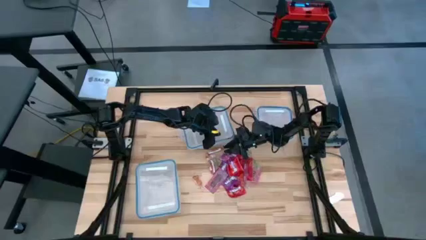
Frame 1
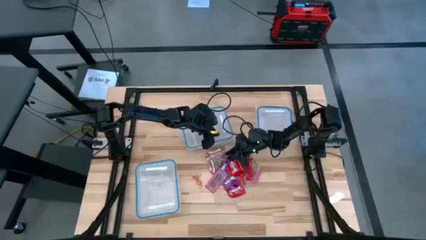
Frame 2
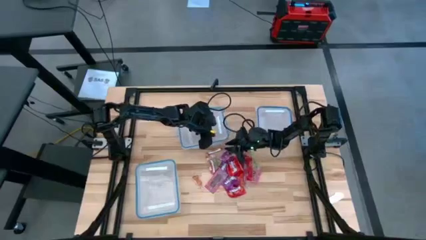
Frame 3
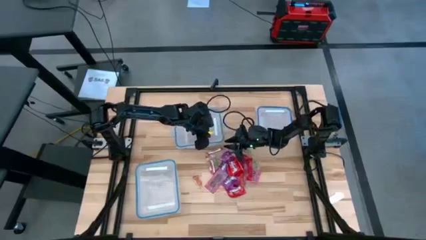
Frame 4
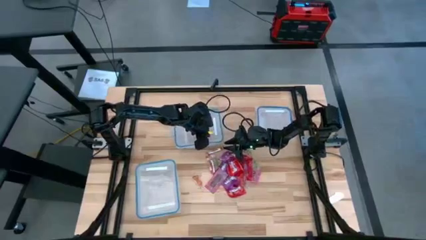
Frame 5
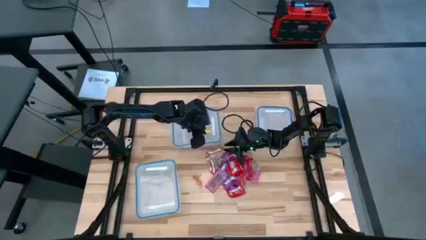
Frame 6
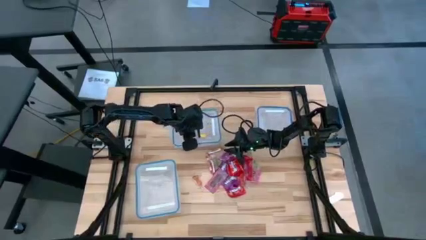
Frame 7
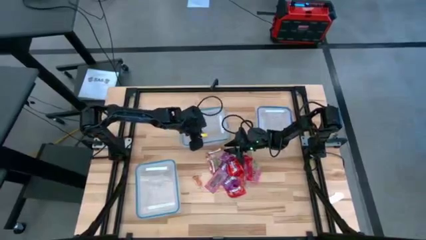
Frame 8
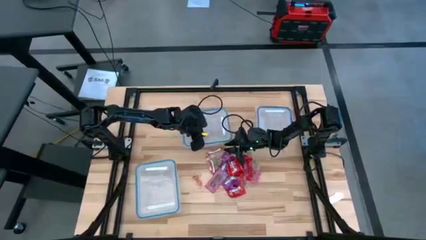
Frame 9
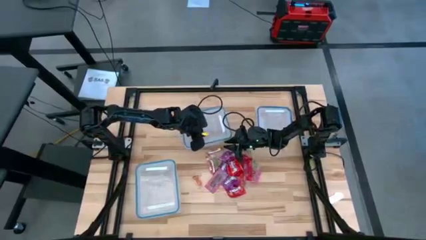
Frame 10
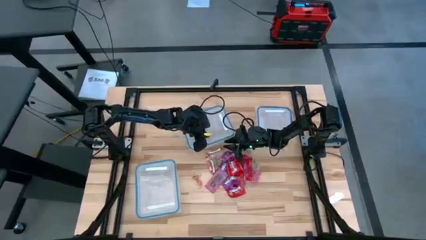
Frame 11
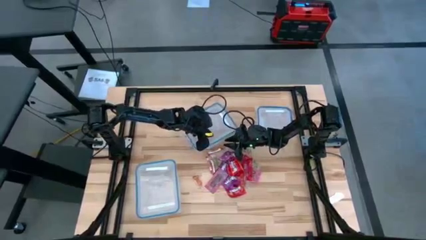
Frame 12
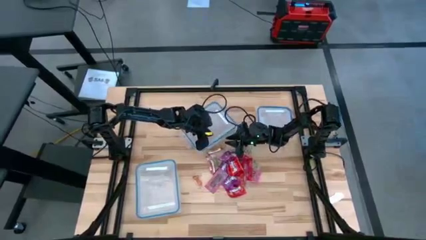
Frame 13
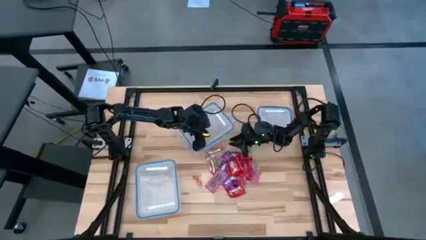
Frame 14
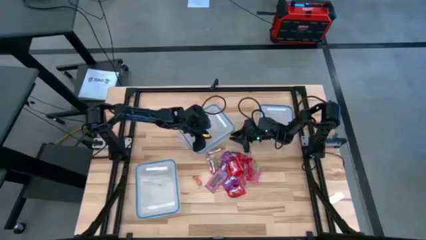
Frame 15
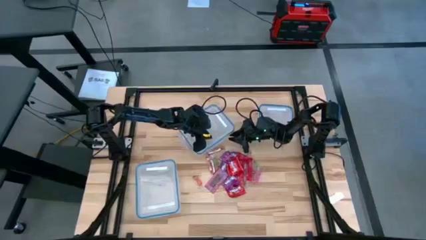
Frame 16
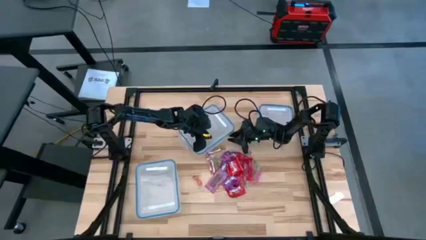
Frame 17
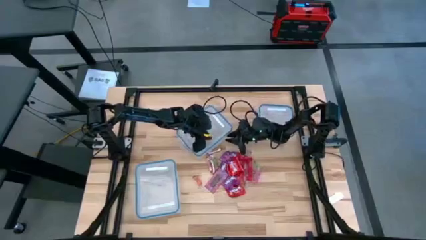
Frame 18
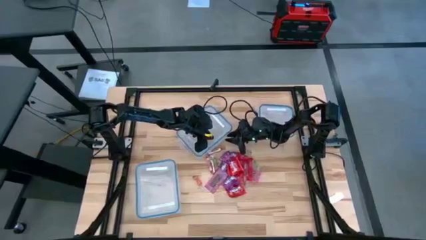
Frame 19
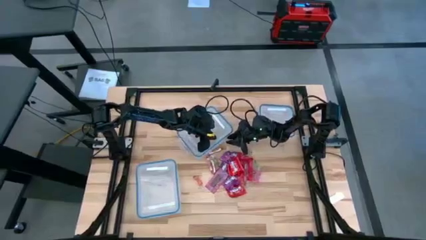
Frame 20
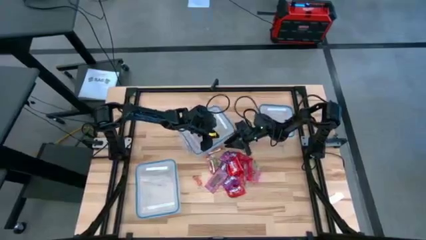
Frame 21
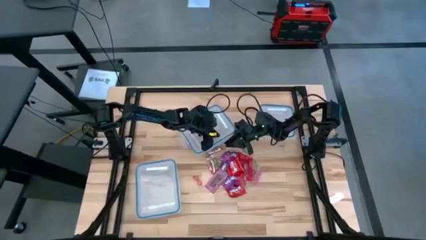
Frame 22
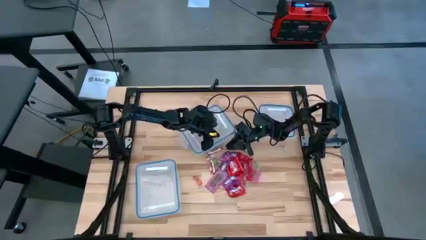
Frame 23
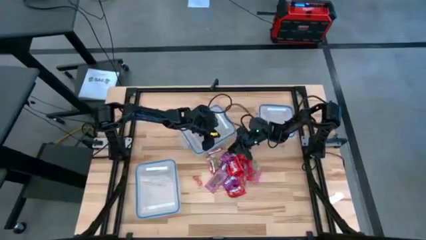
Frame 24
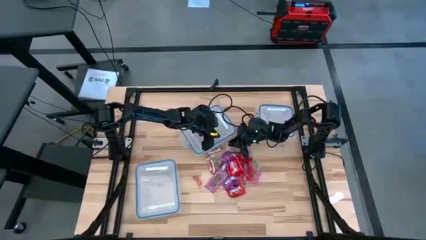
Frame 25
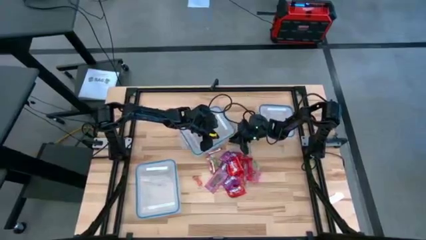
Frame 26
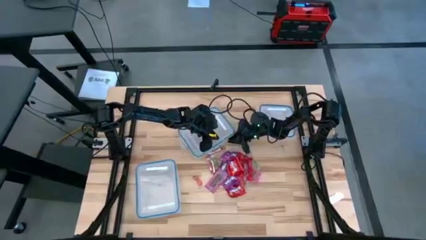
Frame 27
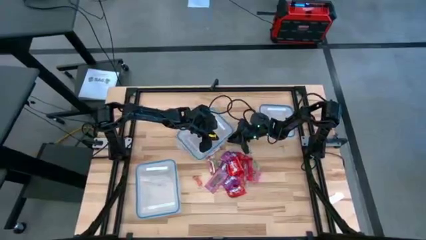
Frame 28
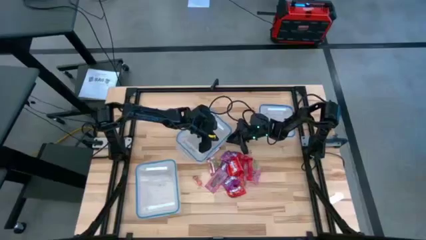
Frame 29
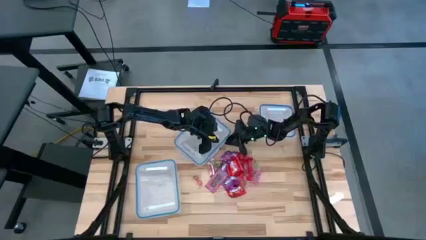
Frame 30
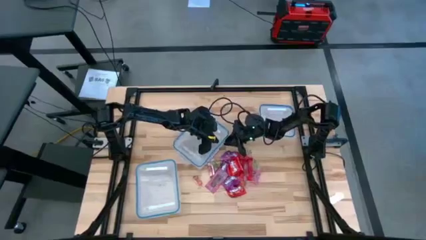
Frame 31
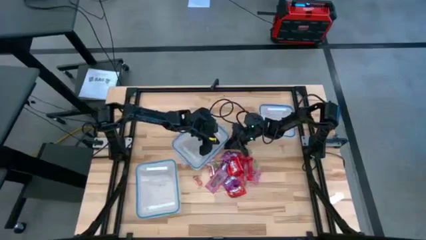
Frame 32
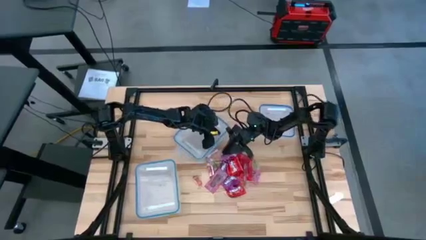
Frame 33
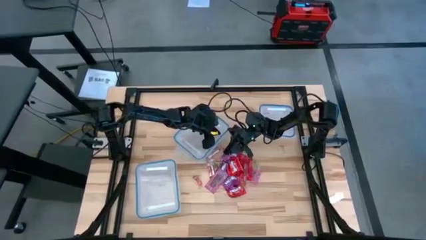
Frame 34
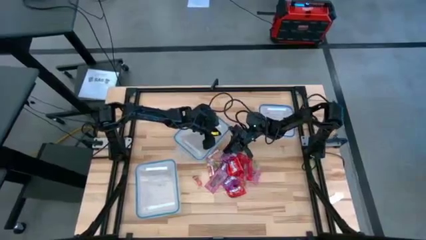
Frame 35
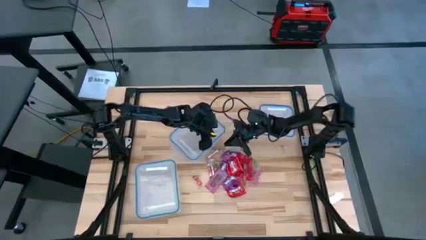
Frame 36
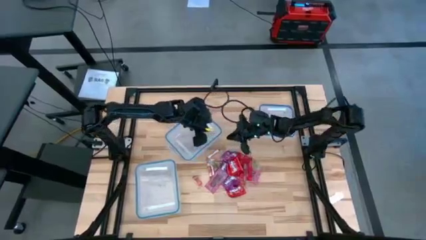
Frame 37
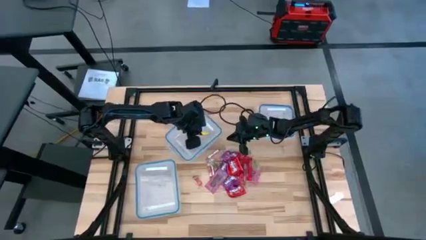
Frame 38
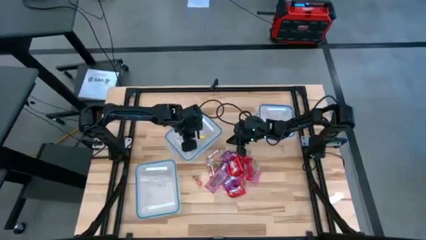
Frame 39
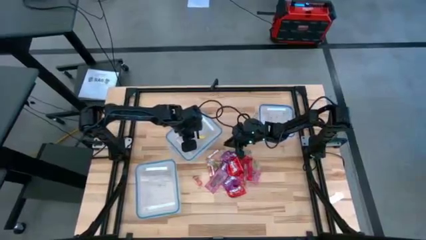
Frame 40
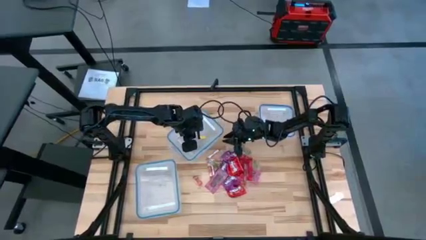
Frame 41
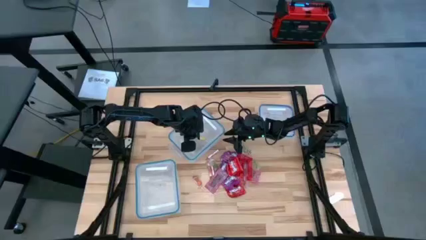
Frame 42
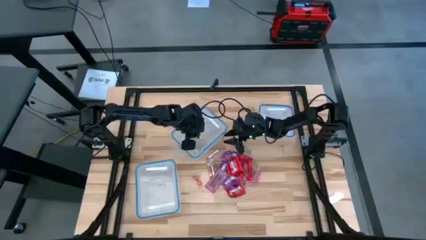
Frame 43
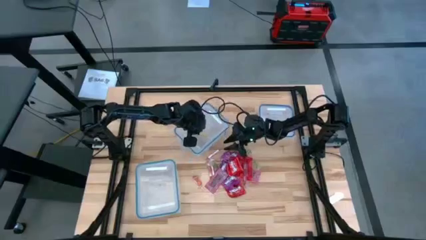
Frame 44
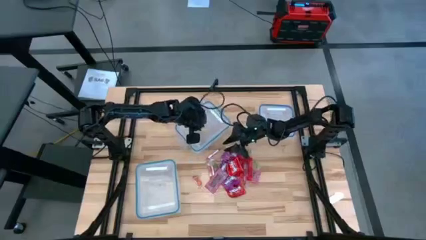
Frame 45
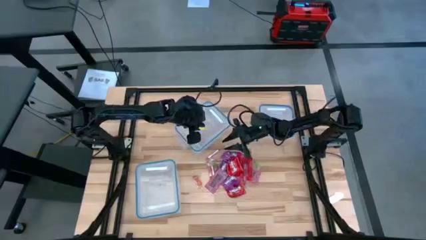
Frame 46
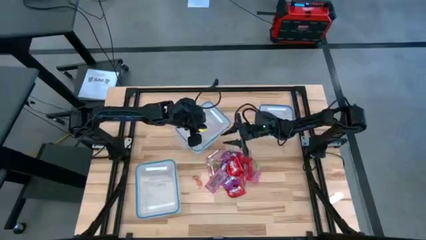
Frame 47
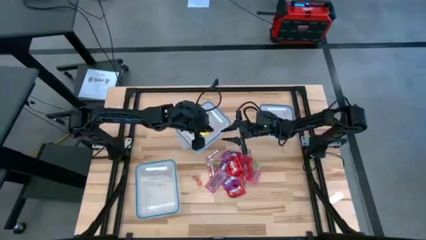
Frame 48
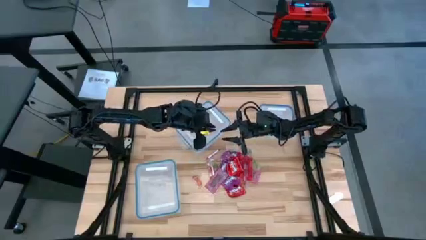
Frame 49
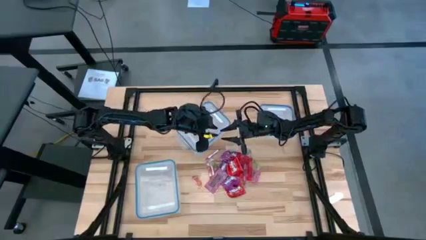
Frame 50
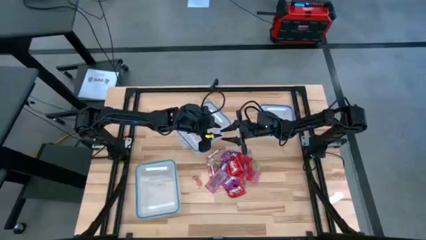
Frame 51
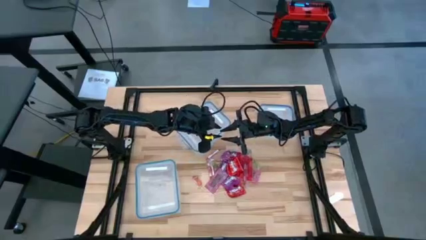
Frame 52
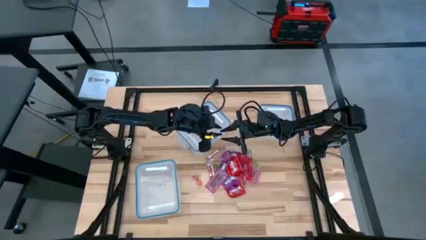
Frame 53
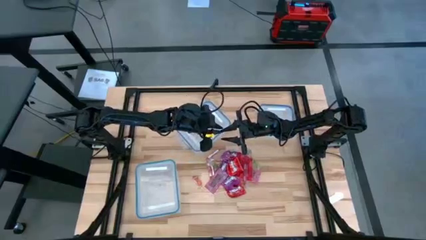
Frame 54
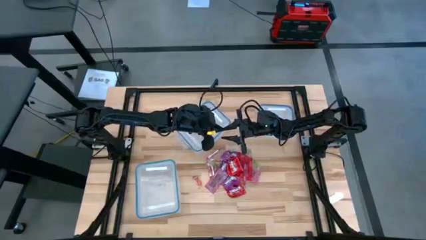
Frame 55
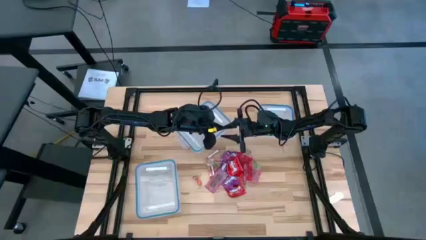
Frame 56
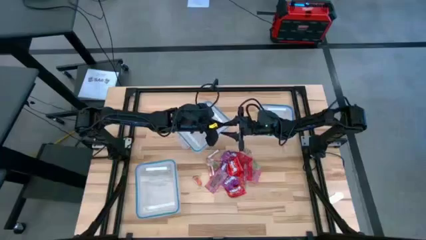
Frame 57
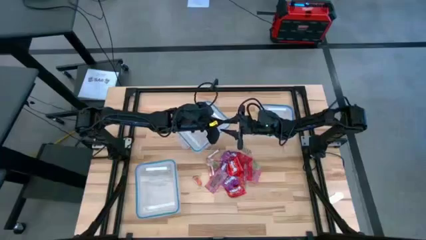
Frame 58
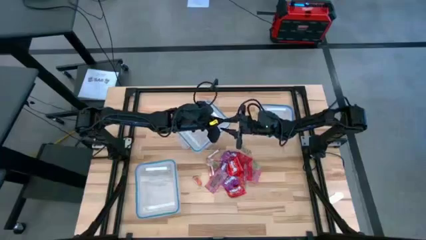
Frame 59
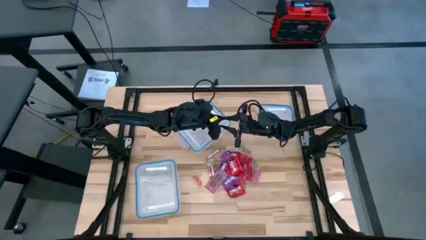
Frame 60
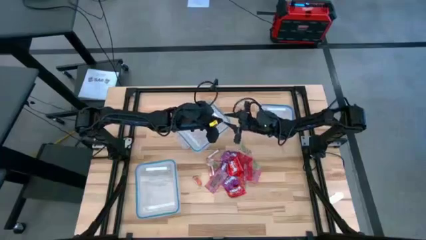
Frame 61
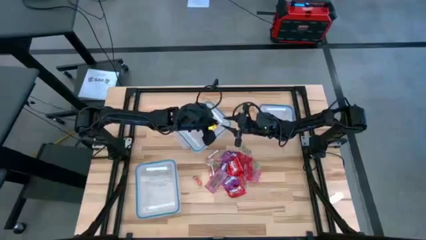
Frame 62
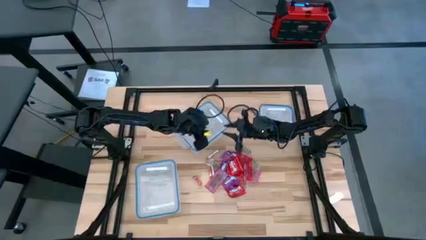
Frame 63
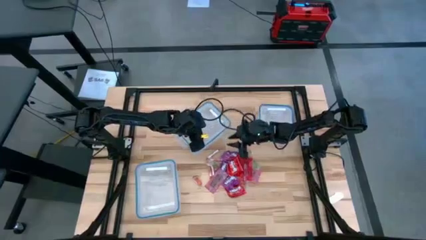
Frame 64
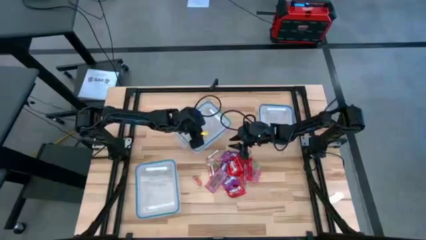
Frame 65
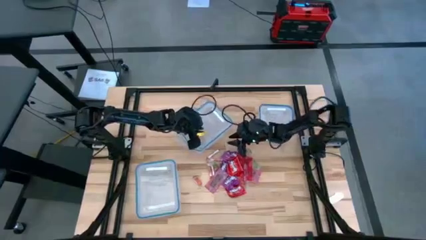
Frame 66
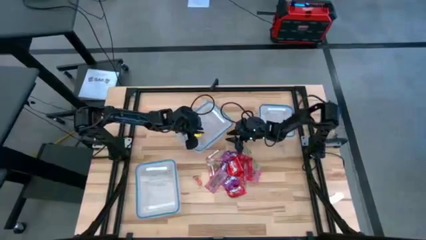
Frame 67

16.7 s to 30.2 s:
Task: Sort candy
Open the top left transparent bin
